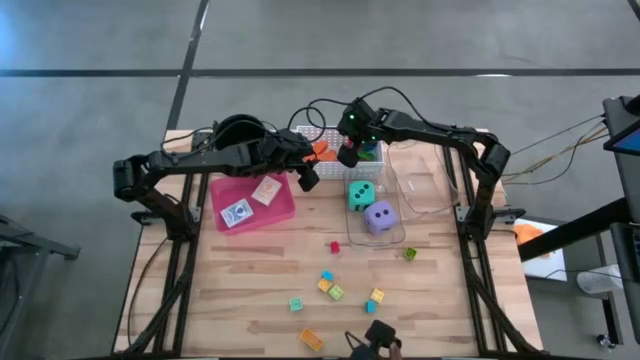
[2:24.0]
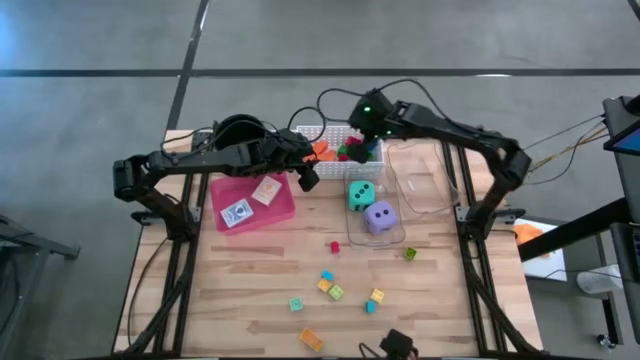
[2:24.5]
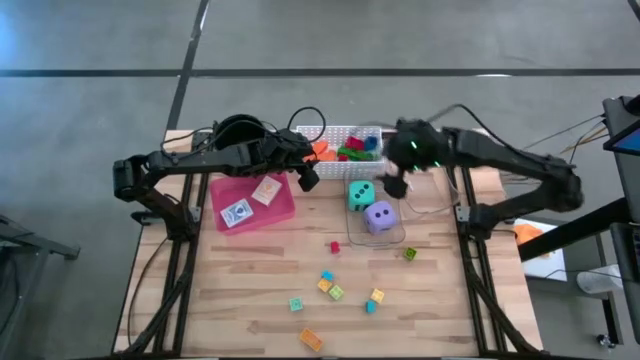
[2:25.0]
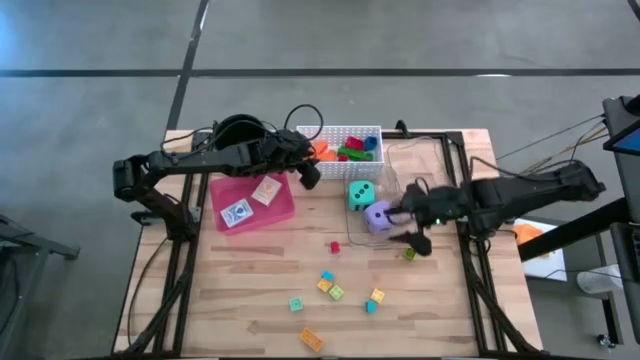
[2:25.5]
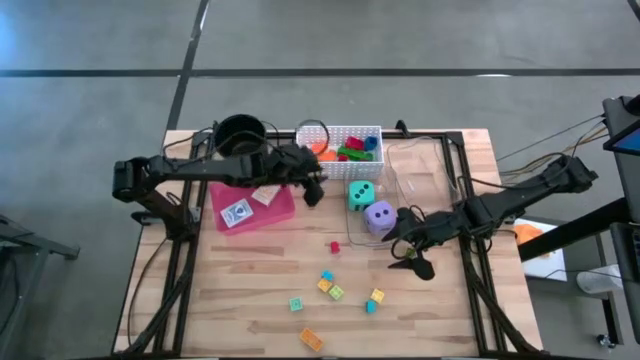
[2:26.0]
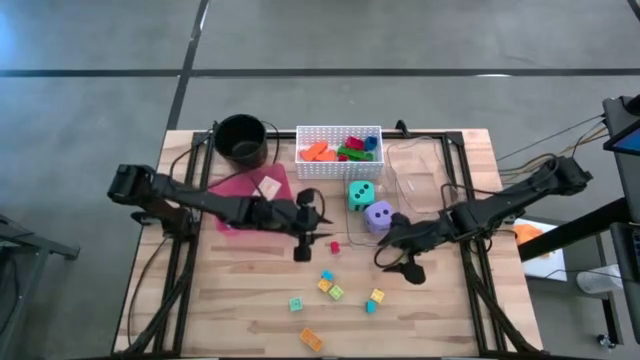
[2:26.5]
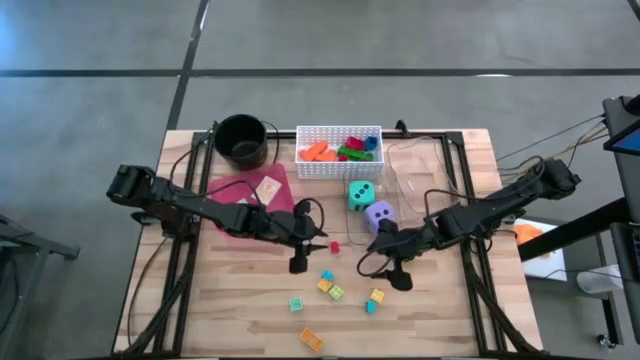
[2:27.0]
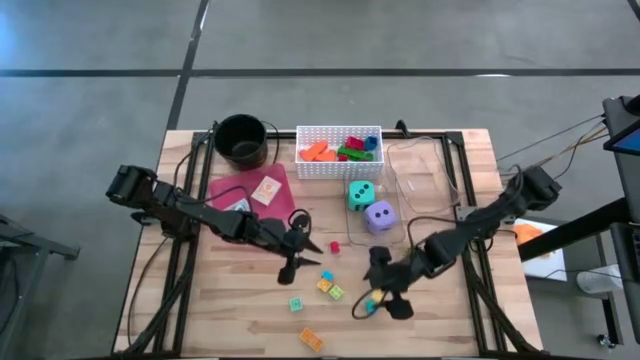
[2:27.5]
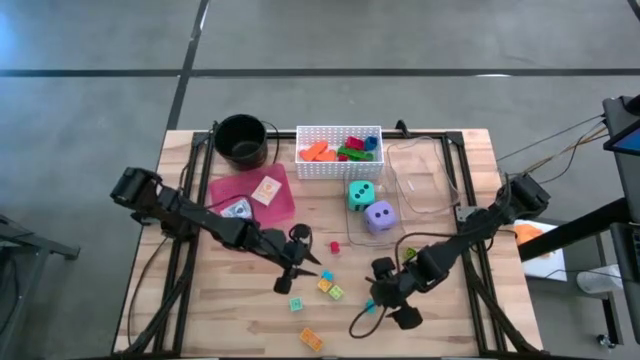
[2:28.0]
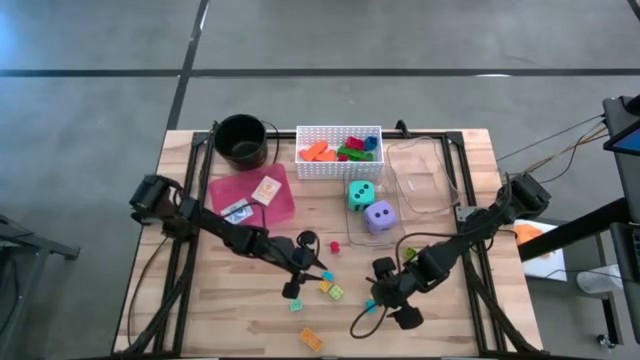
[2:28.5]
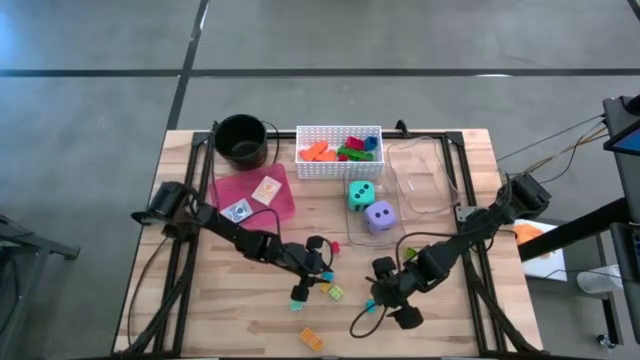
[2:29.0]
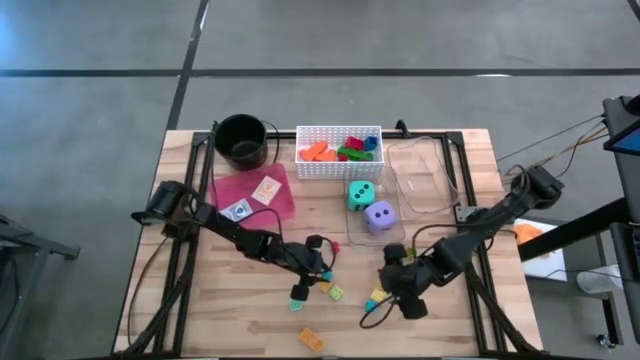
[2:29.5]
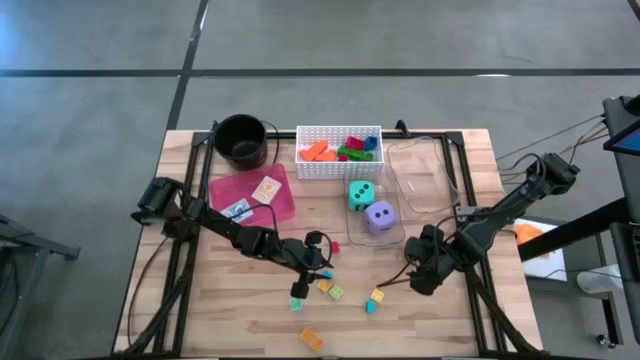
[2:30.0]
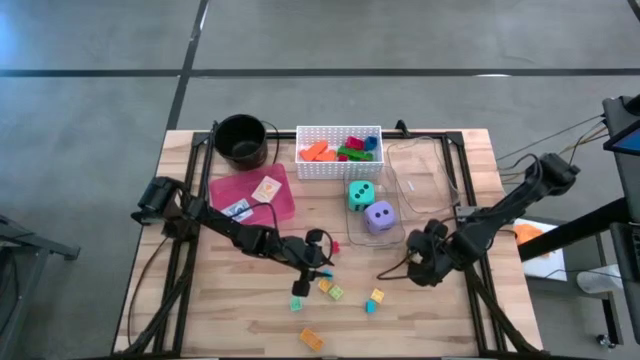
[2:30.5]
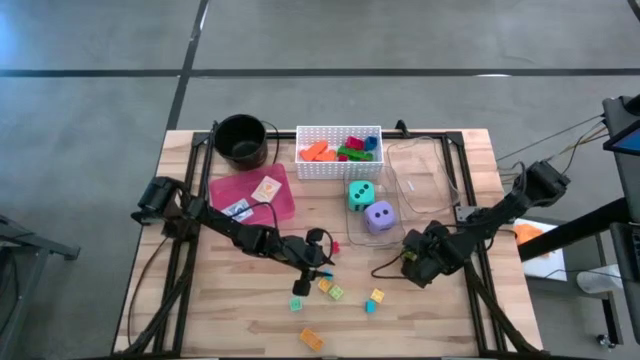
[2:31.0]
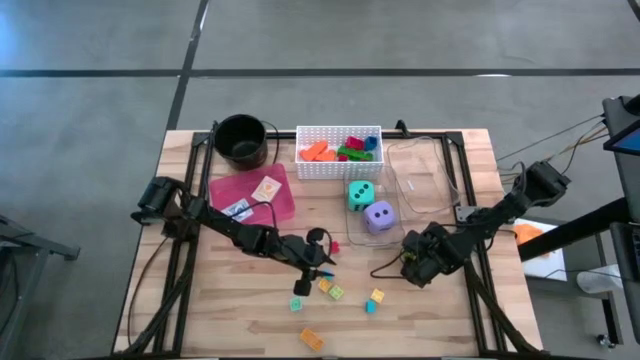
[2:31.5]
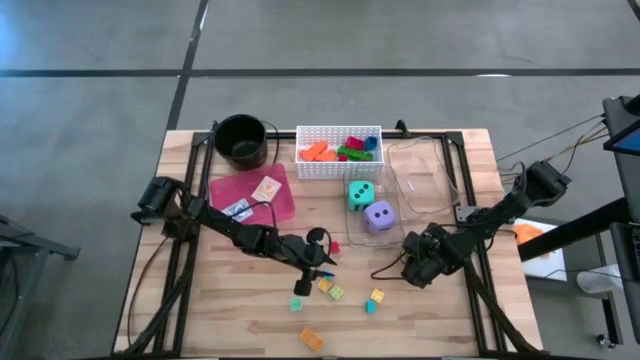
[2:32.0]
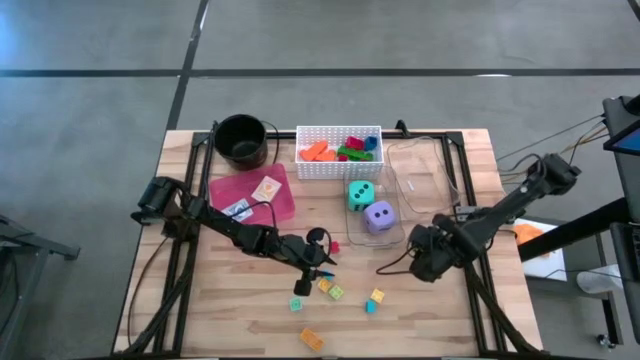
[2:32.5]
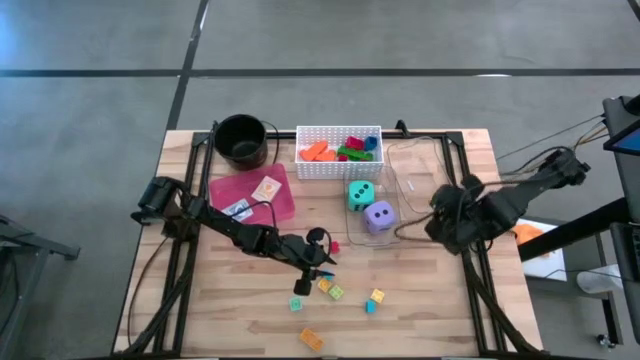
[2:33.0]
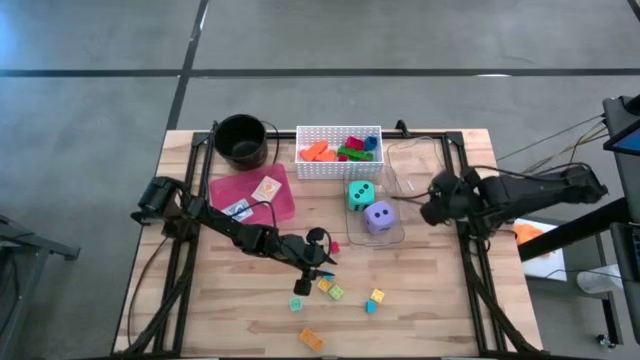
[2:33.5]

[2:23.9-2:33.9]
Task: Pick & Place Toys
Put the small dark green game piece into the right transparent bin

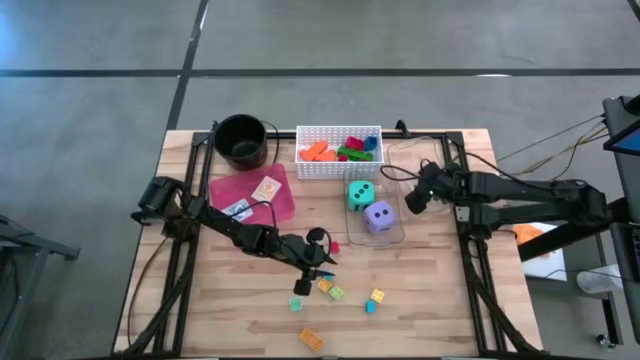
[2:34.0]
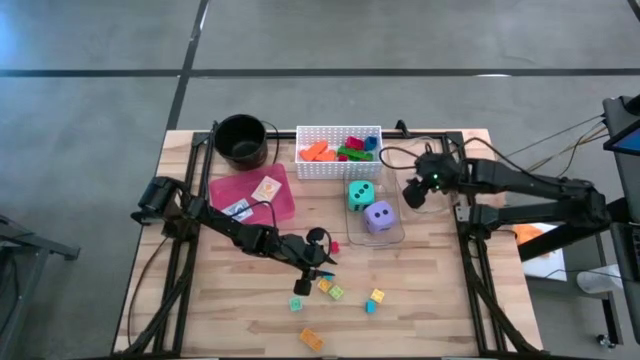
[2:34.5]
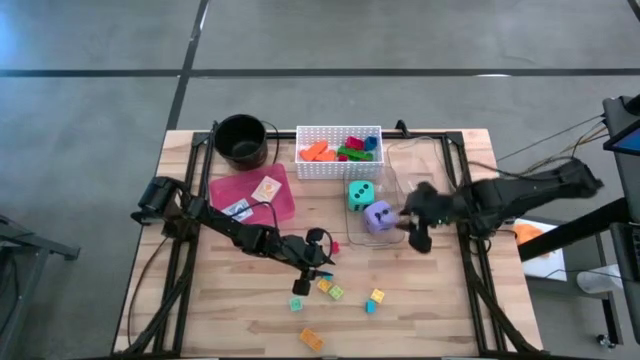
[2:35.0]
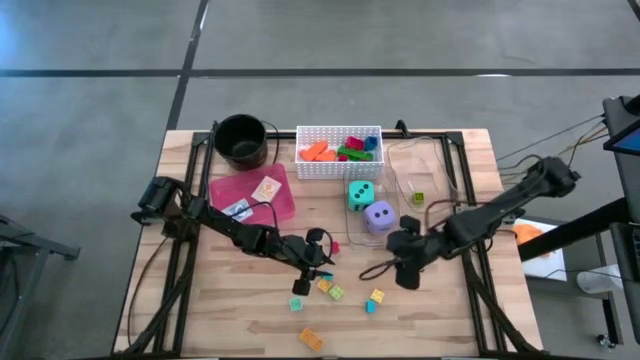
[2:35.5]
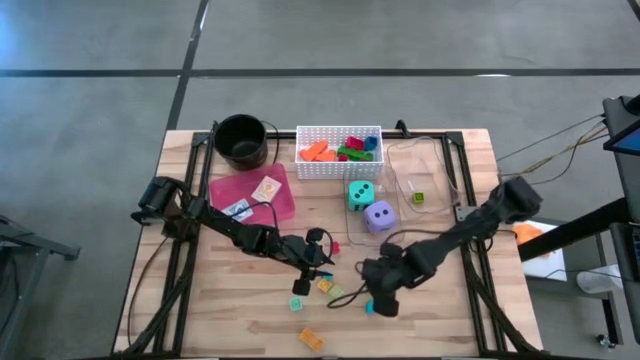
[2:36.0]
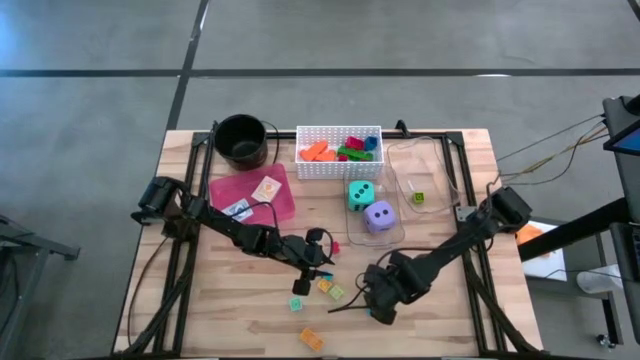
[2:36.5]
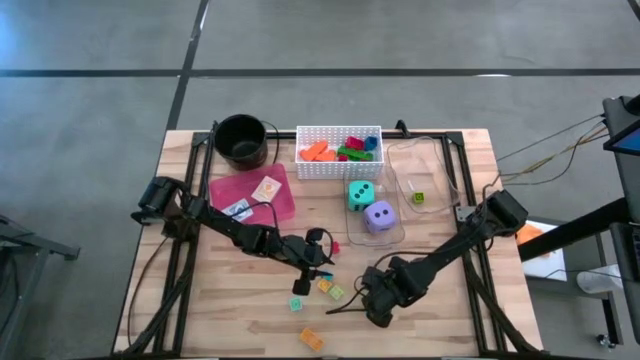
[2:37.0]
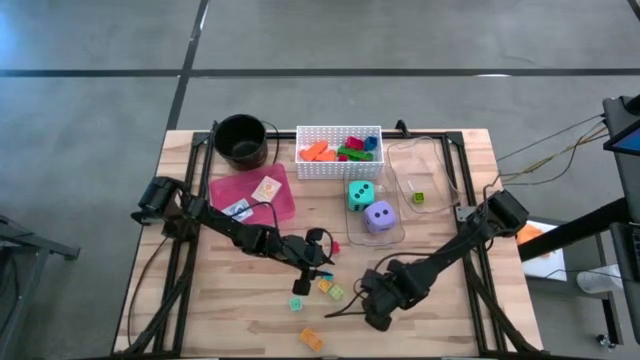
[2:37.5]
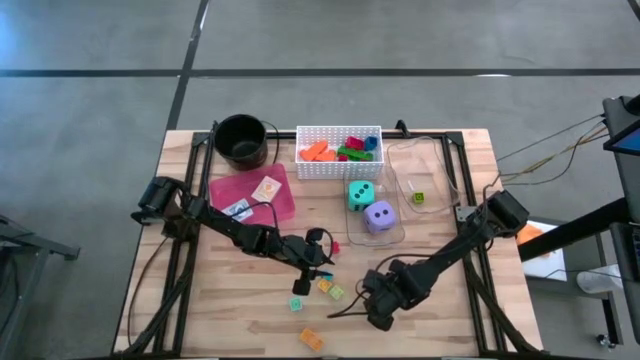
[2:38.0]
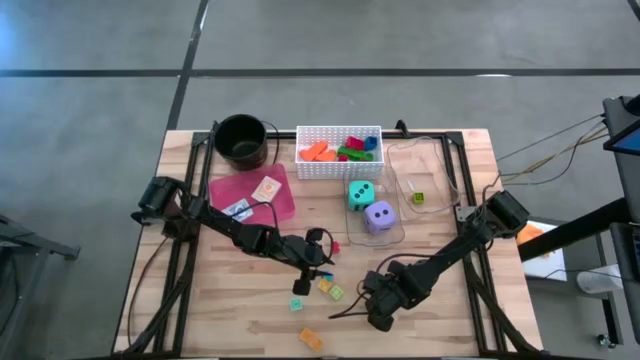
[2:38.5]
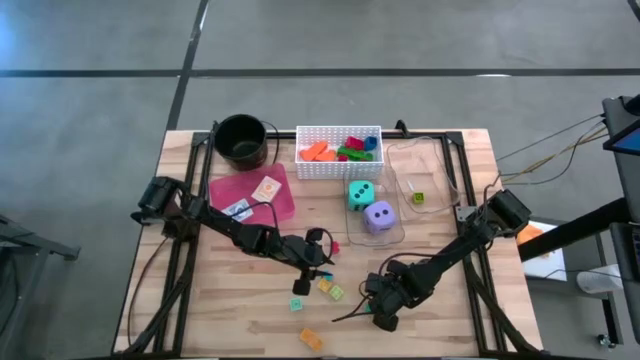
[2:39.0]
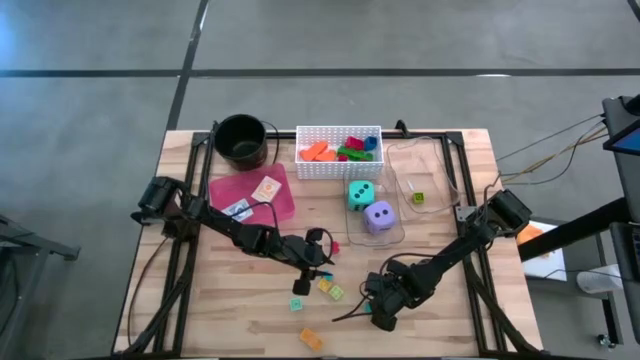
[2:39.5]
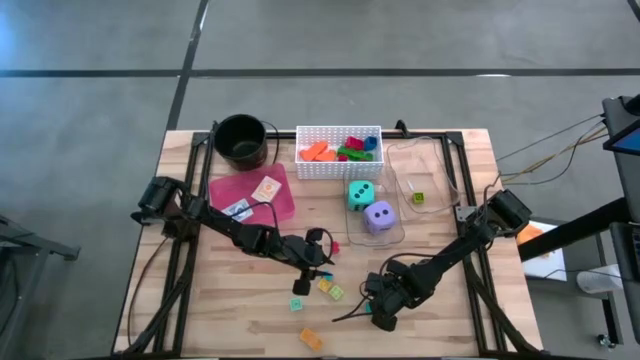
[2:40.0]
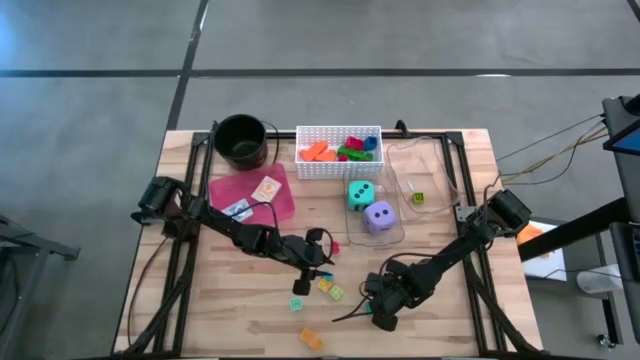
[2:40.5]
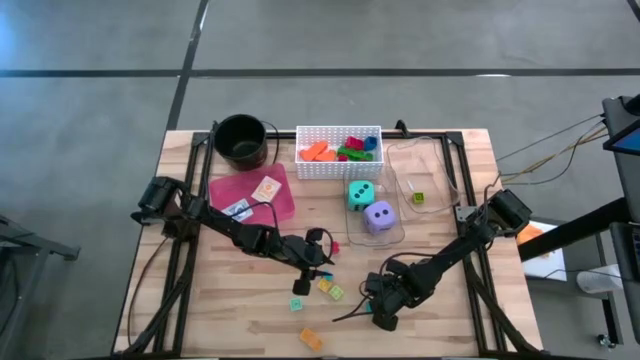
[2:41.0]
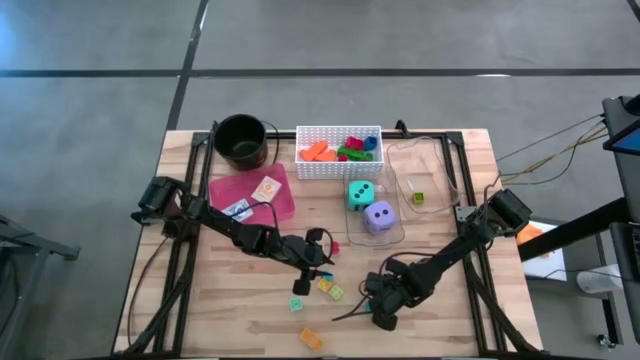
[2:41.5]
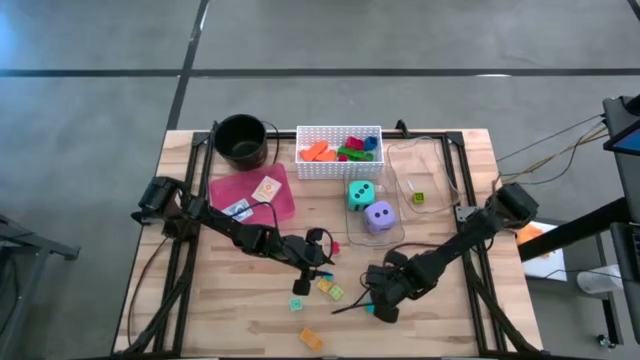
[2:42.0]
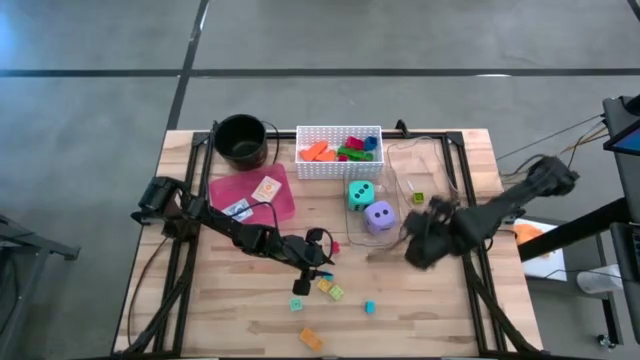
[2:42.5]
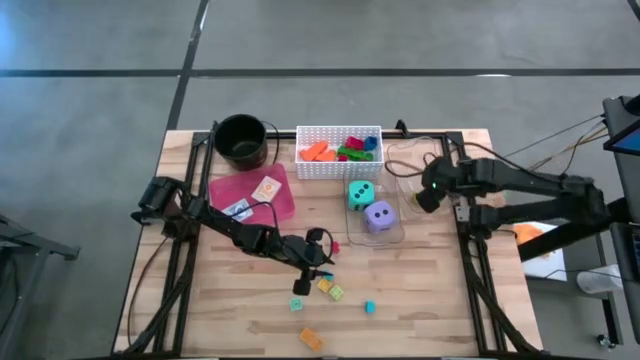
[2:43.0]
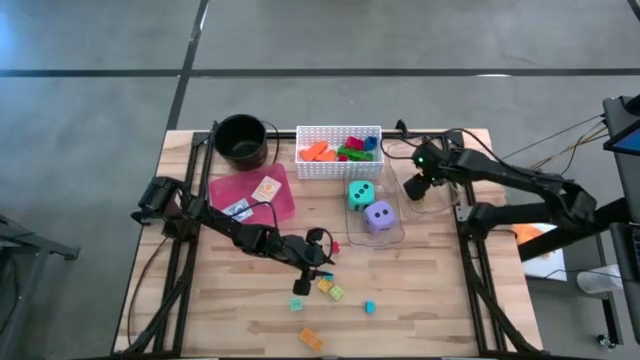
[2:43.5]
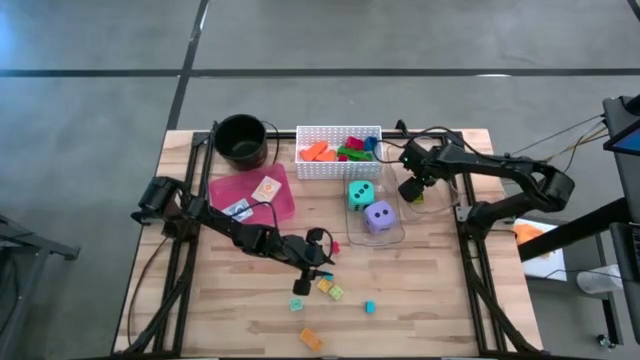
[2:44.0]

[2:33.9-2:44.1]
Put the small light yellow game piece into the right transparent bin
